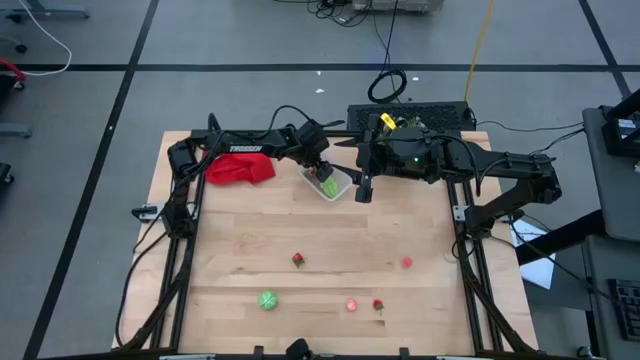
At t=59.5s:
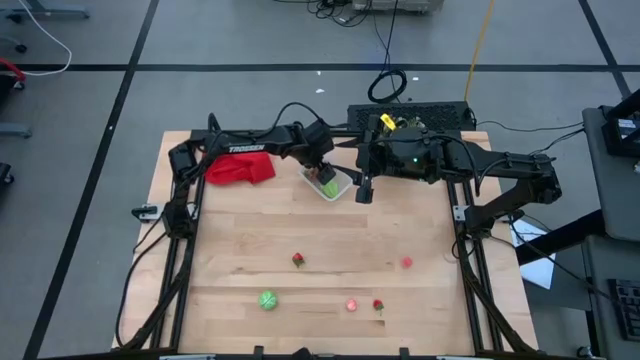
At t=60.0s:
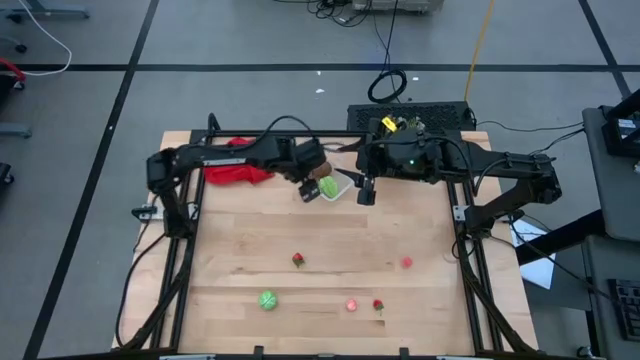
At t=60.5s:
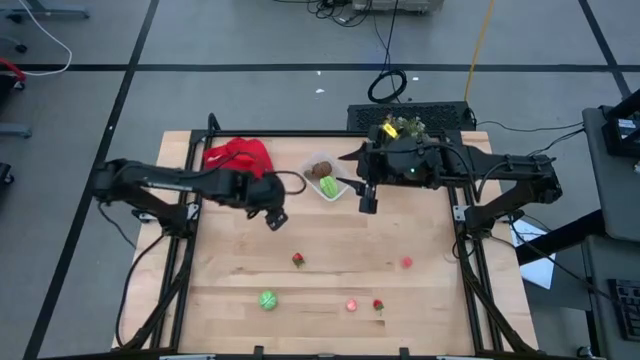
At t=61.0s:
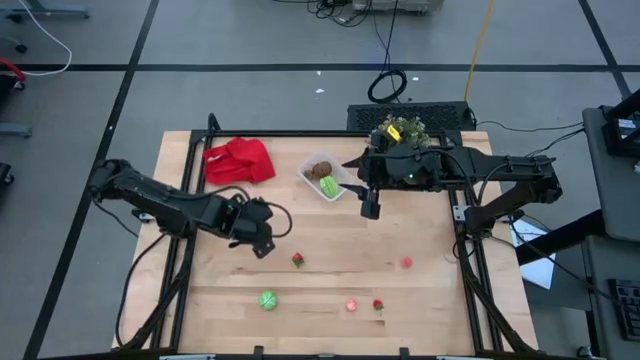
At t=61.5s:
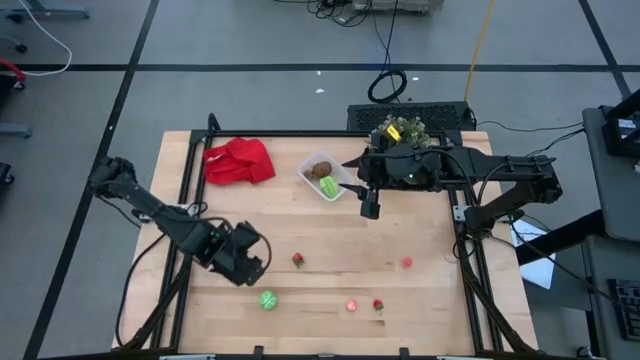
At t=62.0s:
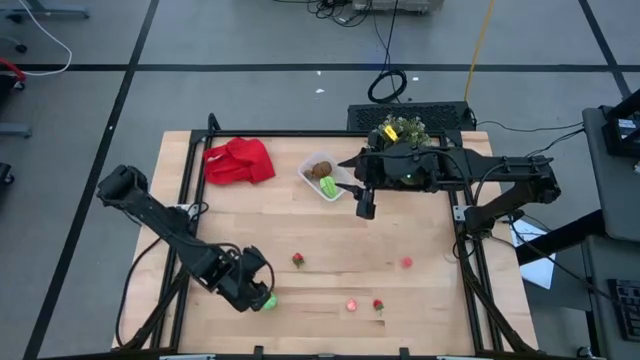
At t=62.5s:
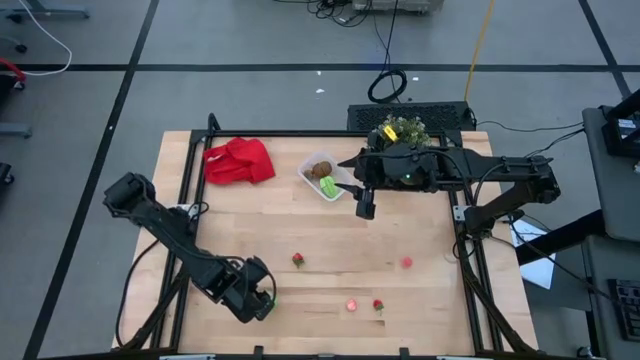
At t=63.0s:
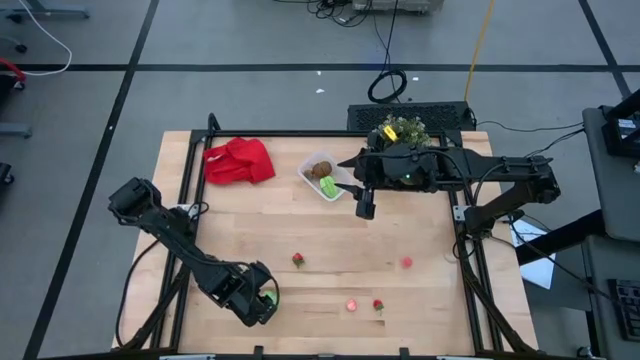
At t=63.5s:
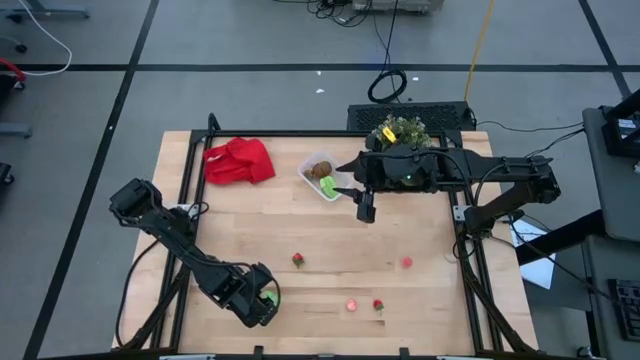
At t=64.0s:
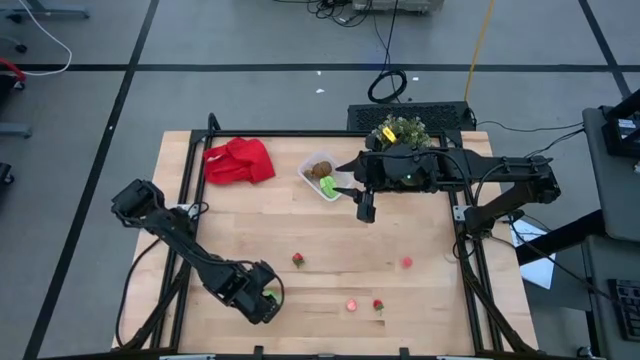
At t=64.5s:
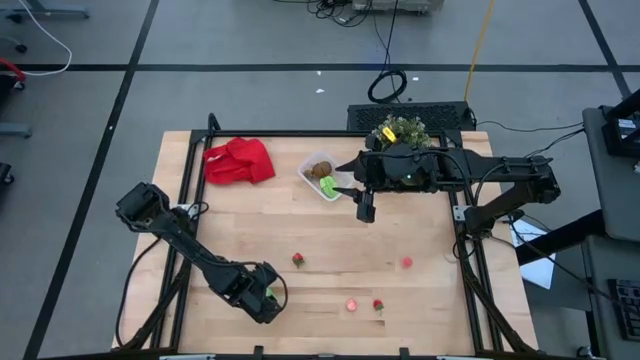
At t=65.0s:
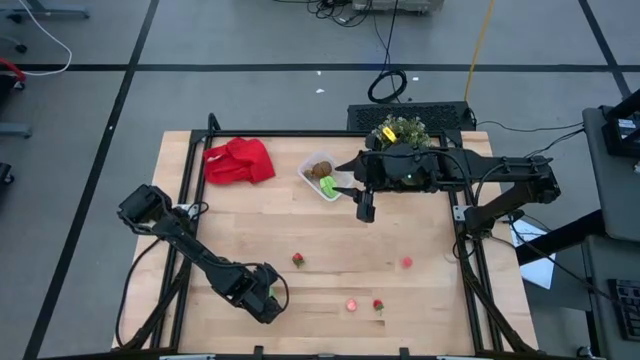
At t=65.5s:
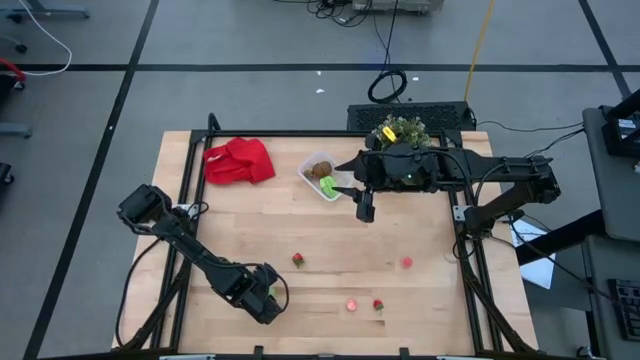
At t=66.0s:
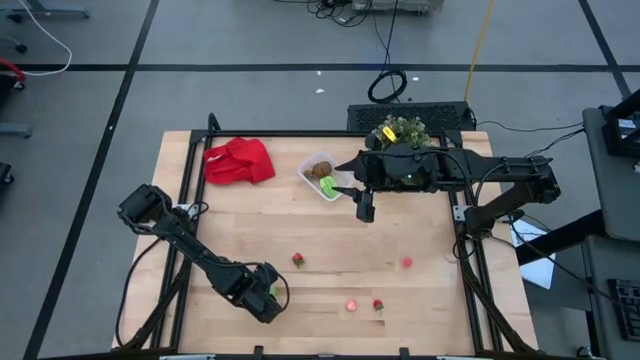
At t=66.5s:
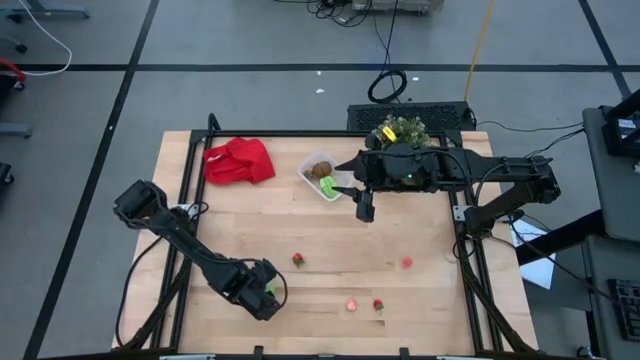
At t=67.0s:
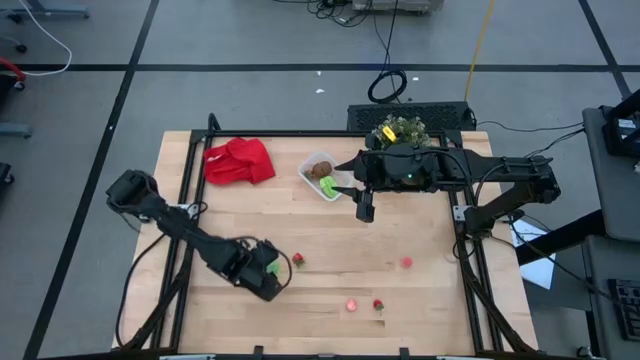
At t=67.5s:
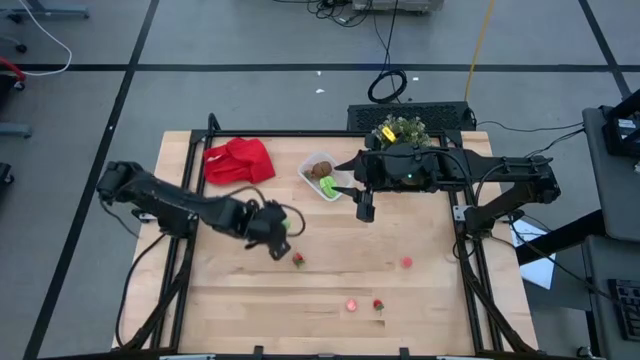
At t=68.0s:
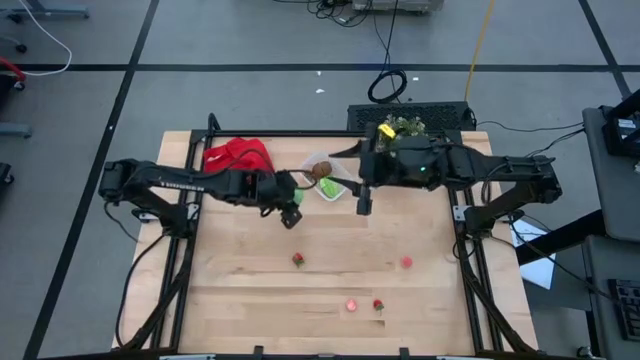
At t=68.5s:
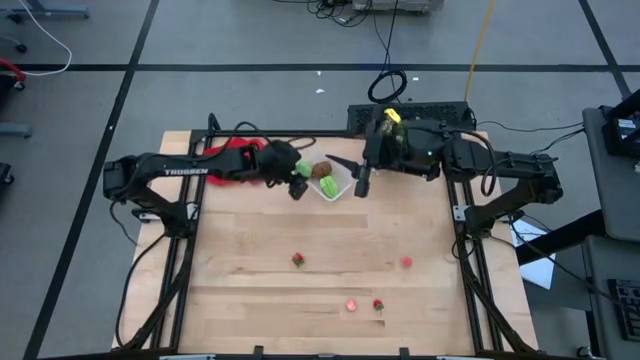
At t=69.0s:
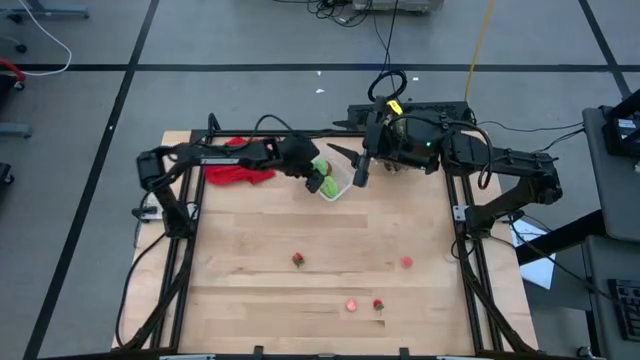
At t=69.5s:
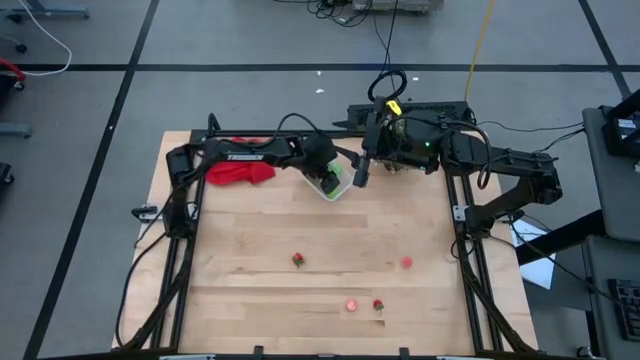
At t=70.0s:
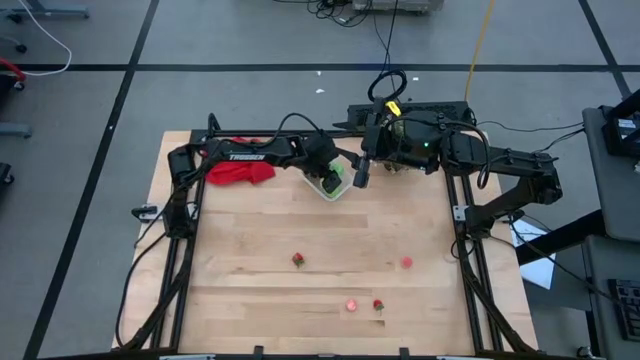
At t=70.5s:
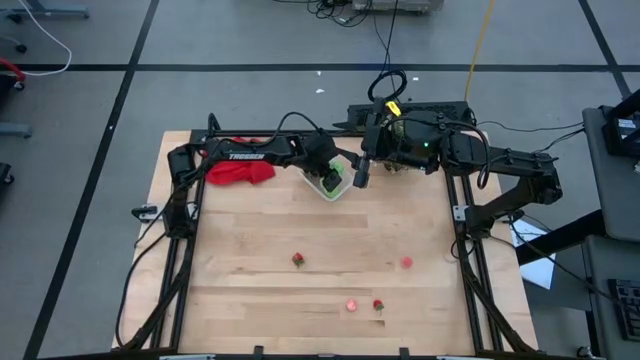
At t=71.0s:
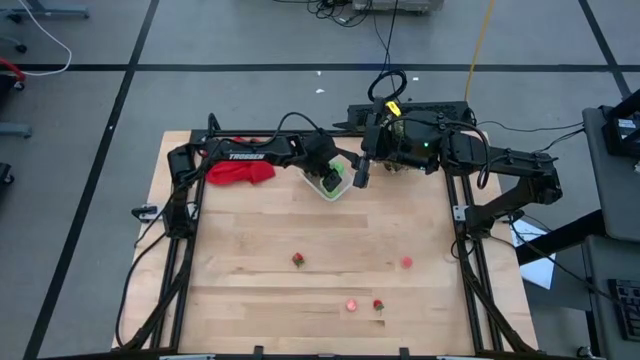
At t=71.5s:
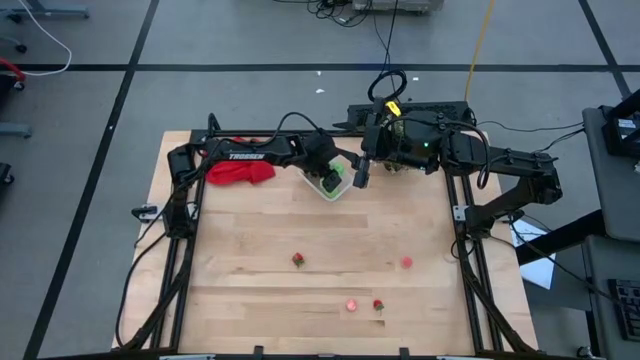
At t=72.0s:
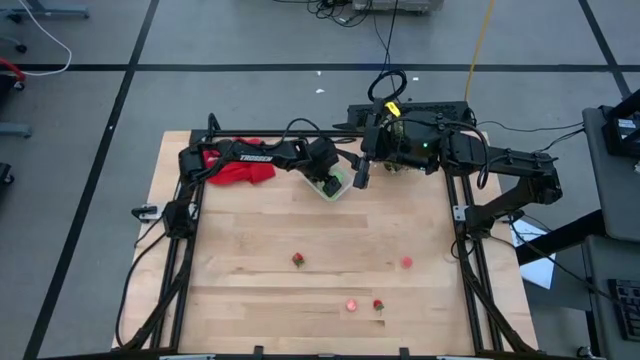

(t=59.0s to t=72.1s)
Task: Pick and placing Produce into tupperware
Put the green cabbage into the transparent bin

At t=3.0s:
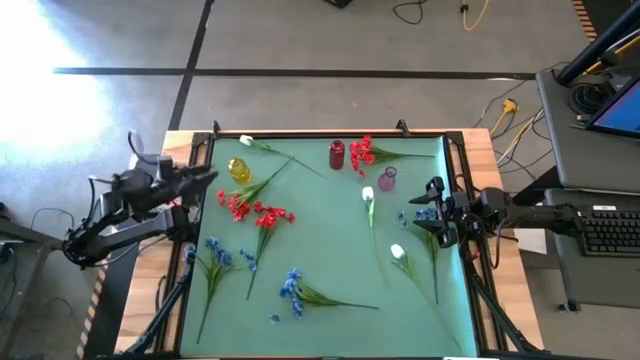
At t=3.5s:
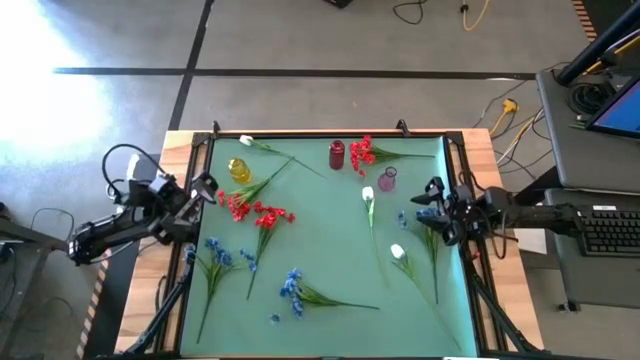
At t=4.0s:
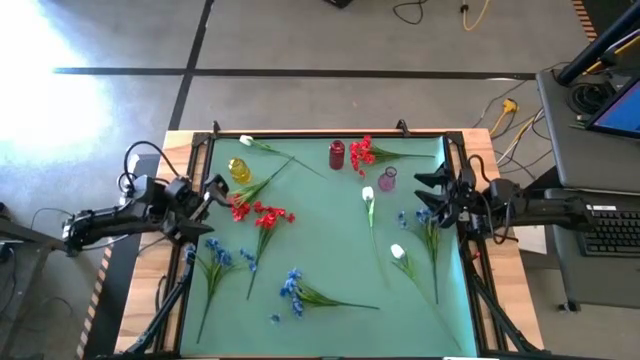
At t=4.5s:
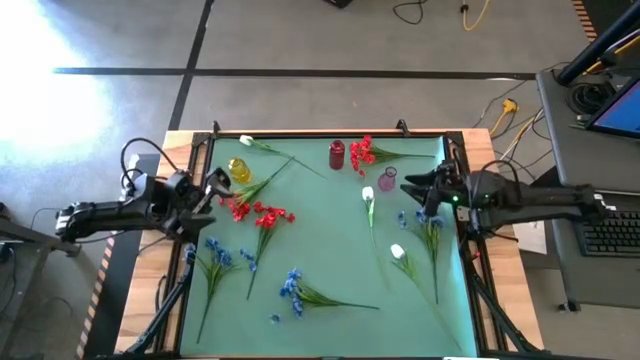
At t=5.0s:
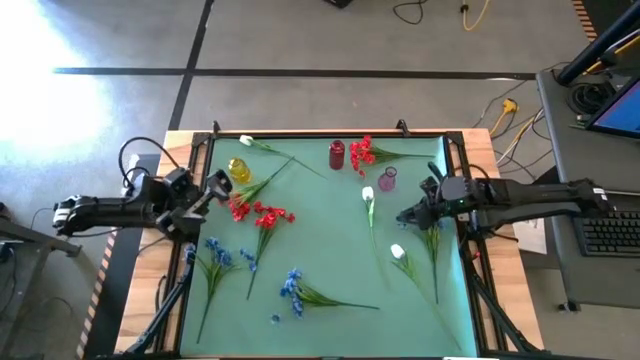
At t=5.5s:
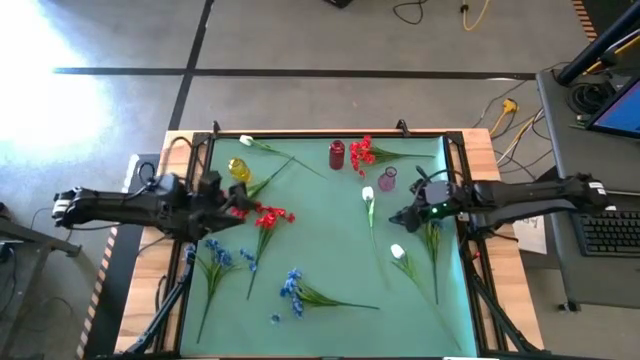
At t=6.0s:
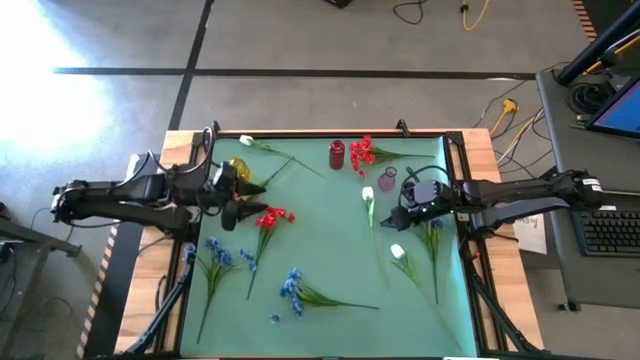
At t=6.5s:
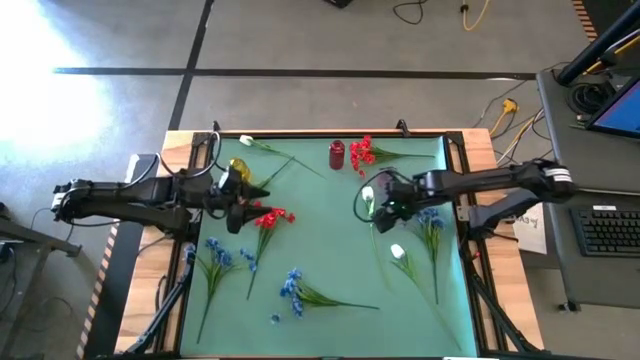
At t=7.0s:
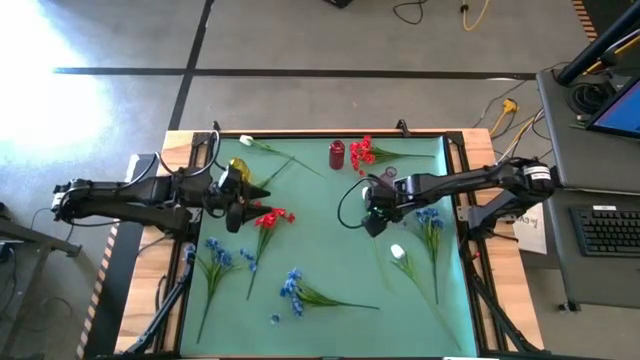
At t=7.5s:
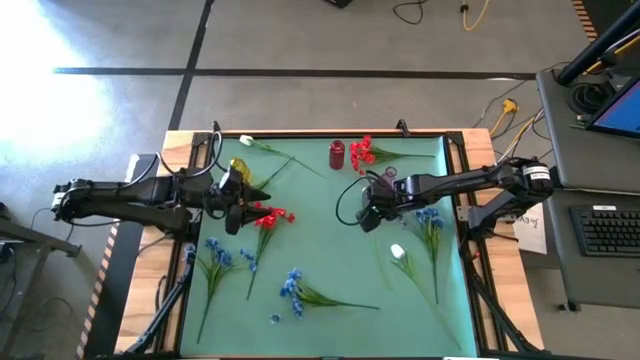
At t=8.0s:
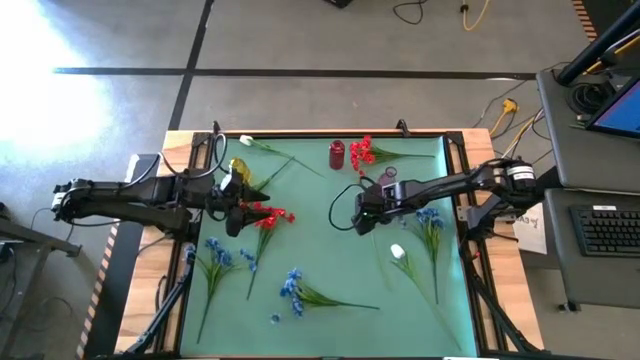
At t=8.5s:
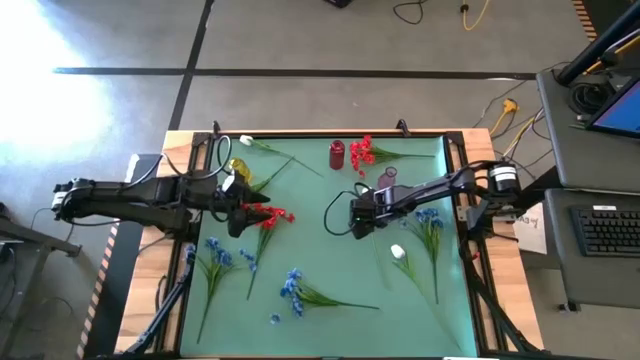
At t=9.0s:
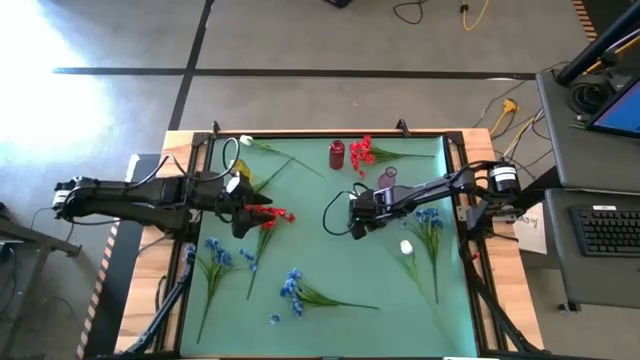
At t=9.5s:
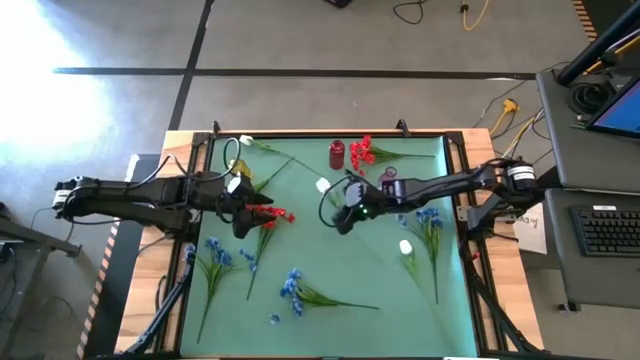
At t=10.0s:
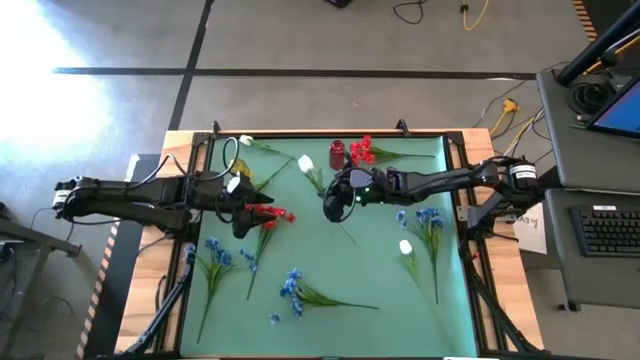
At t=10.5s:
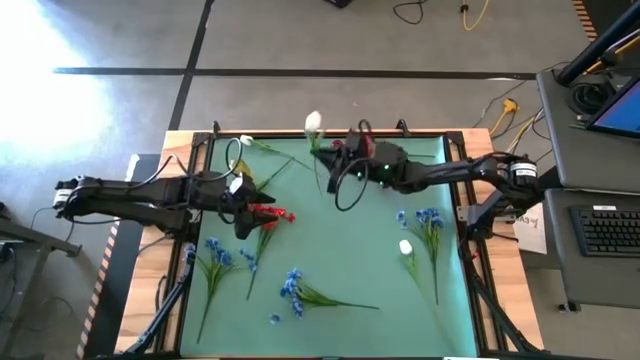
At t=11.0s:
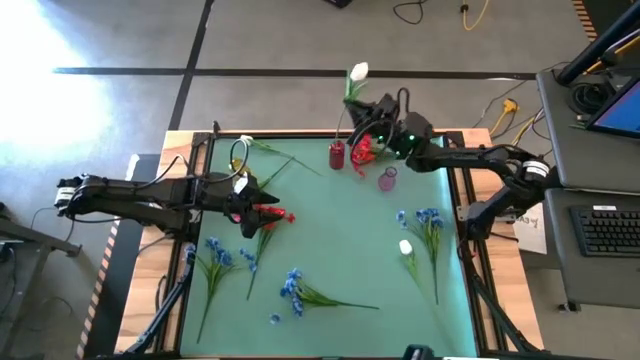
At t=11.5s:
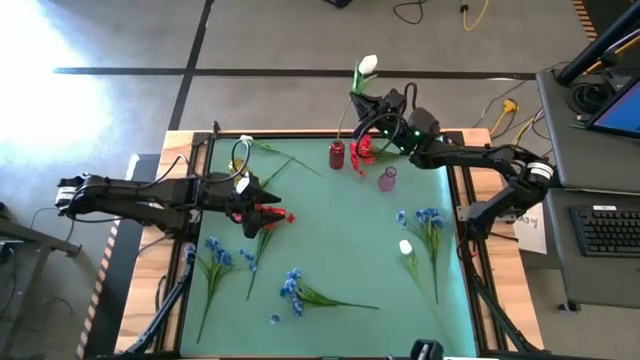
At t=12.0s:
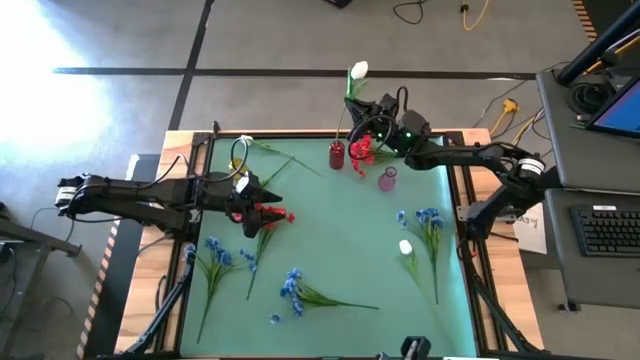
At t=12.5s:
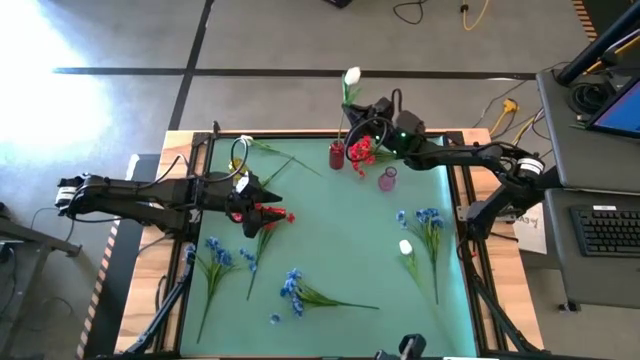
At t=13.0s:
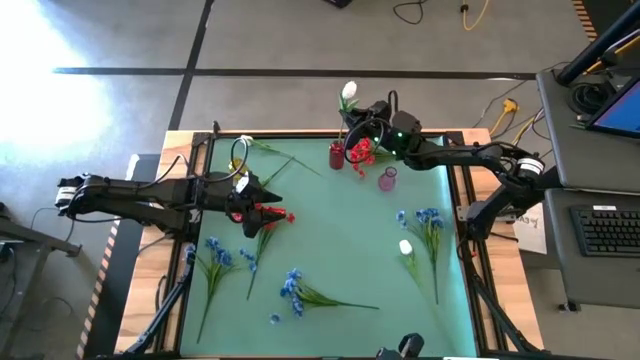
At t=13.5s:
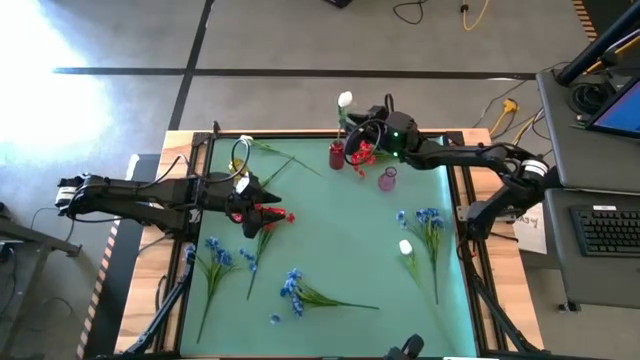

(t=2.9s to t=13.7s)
Task: Sort flowers into vase by color
Put the center white flower into the red vase
